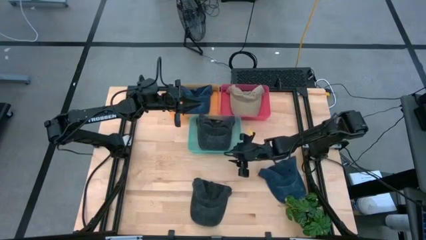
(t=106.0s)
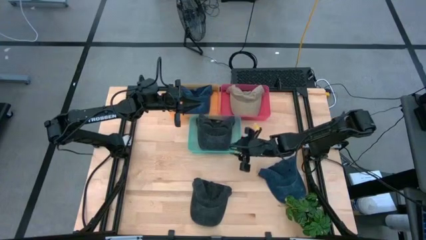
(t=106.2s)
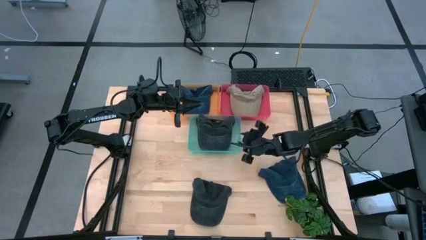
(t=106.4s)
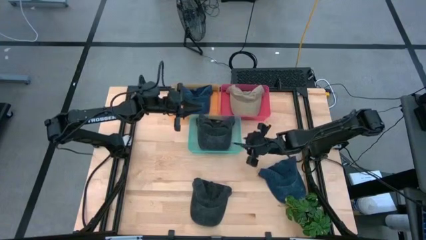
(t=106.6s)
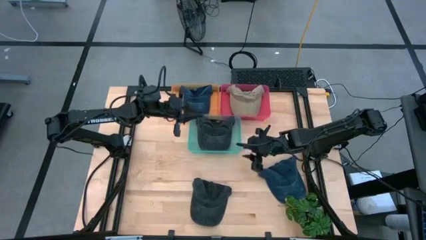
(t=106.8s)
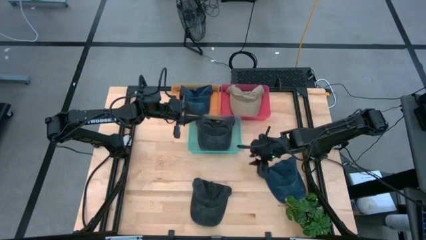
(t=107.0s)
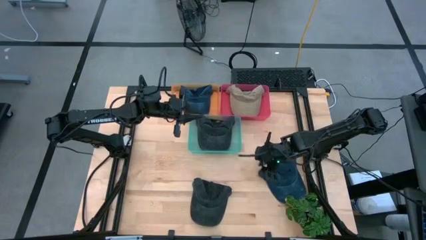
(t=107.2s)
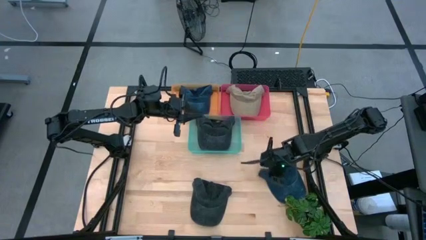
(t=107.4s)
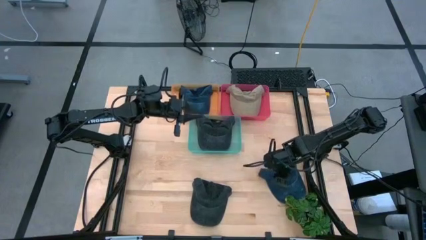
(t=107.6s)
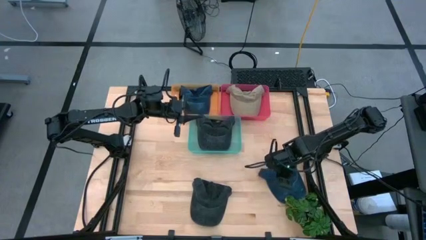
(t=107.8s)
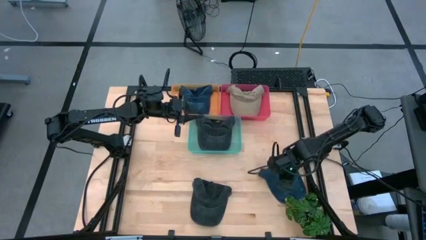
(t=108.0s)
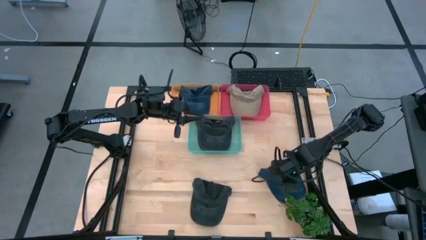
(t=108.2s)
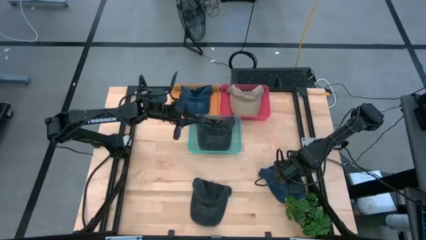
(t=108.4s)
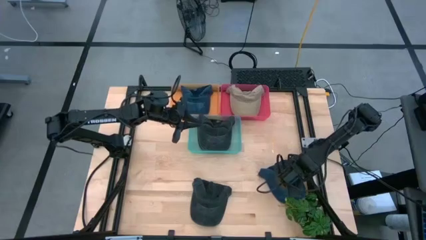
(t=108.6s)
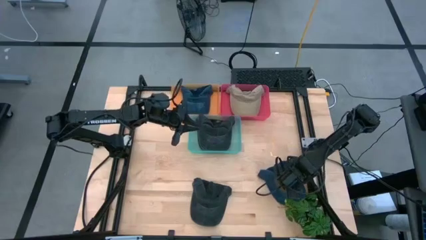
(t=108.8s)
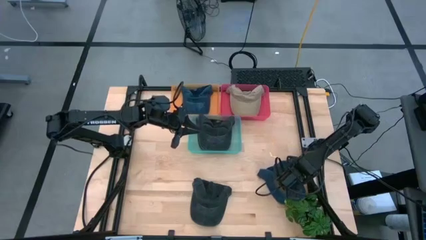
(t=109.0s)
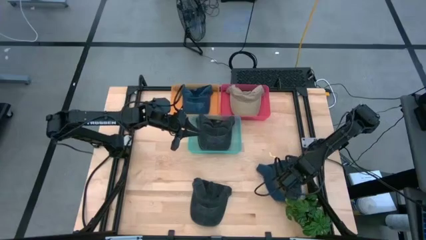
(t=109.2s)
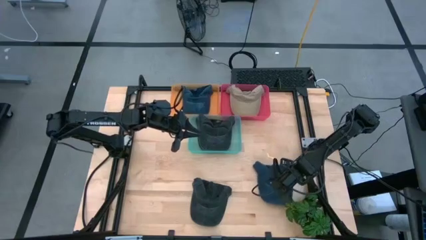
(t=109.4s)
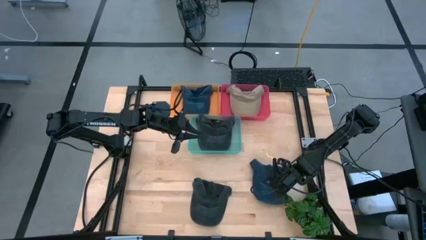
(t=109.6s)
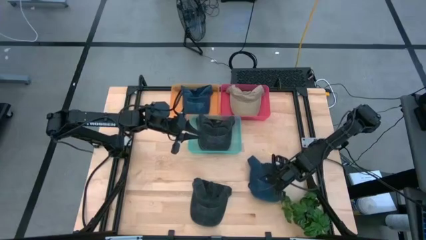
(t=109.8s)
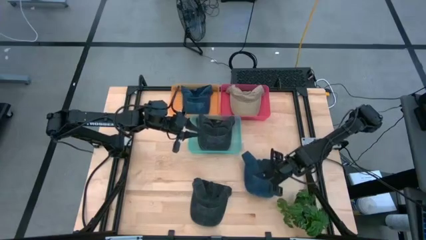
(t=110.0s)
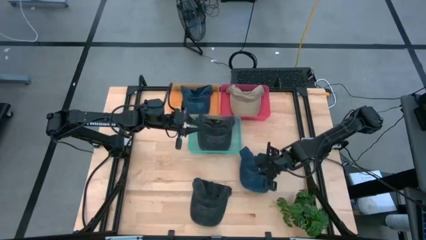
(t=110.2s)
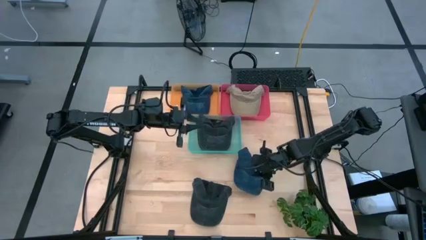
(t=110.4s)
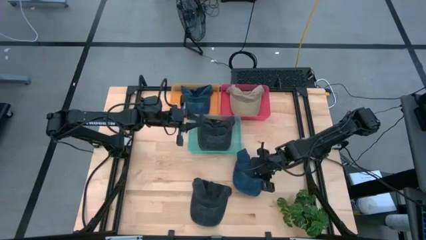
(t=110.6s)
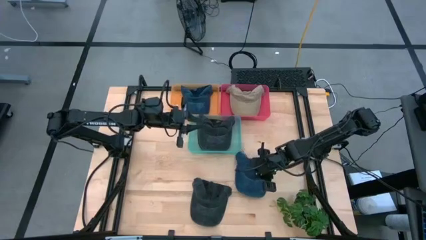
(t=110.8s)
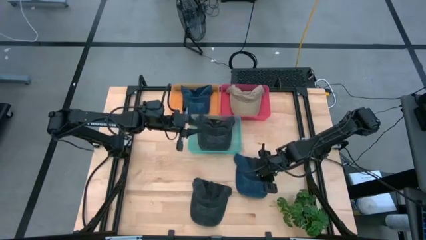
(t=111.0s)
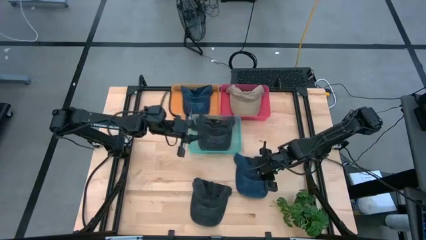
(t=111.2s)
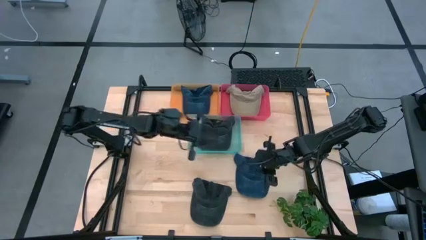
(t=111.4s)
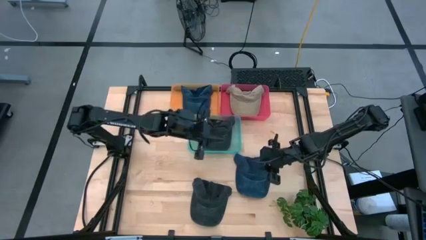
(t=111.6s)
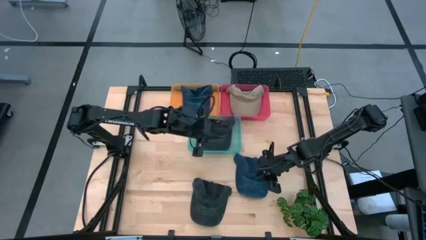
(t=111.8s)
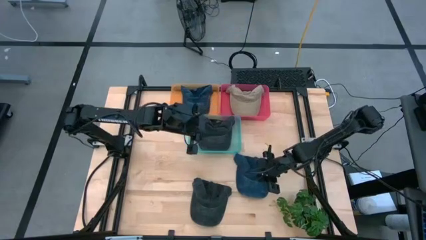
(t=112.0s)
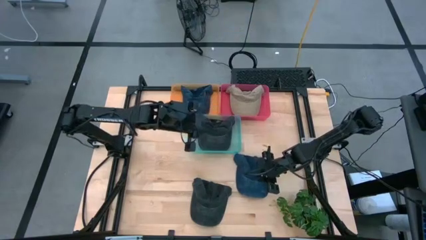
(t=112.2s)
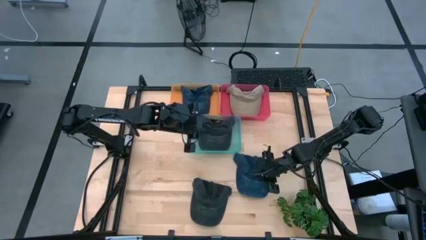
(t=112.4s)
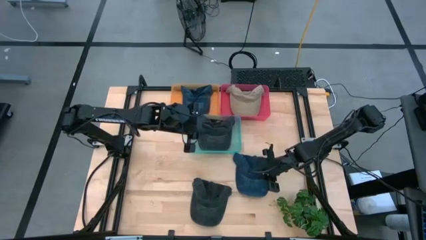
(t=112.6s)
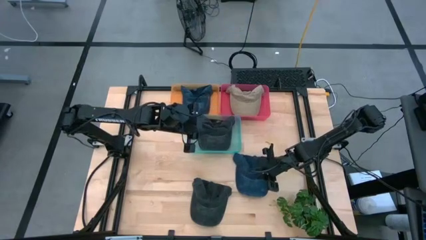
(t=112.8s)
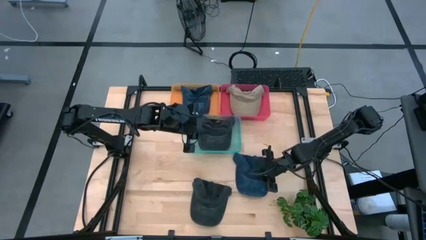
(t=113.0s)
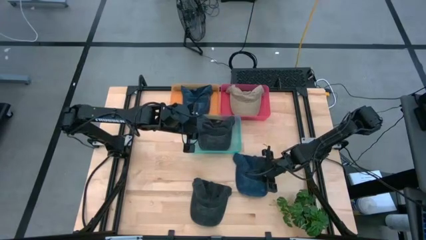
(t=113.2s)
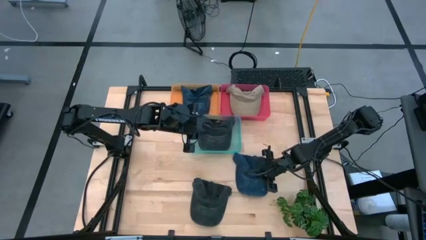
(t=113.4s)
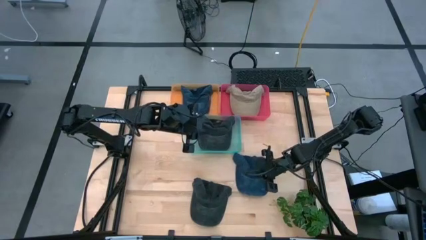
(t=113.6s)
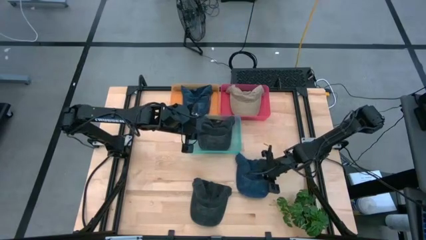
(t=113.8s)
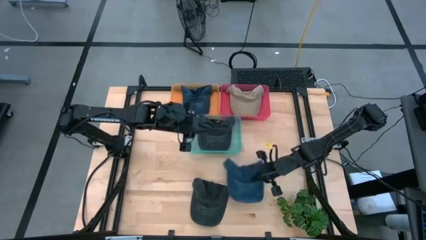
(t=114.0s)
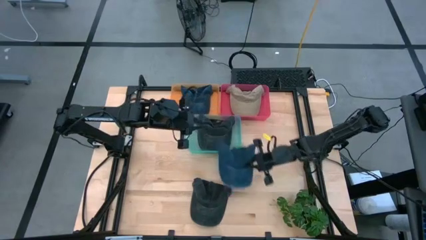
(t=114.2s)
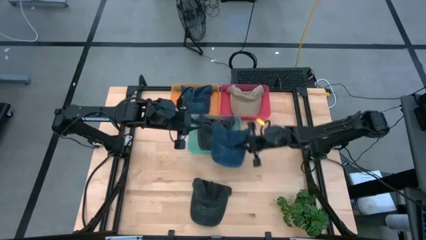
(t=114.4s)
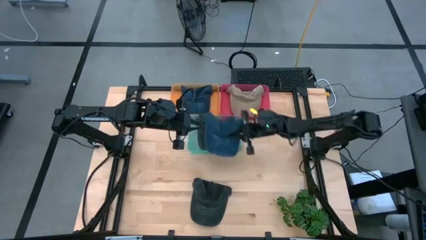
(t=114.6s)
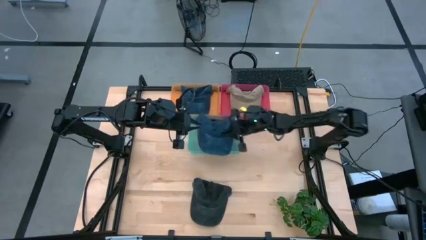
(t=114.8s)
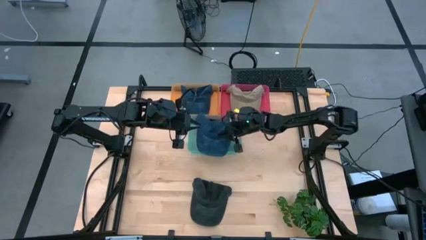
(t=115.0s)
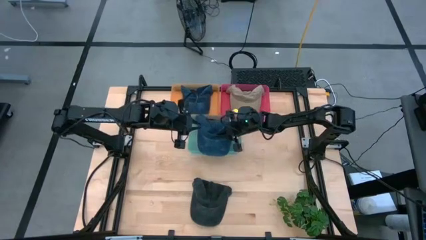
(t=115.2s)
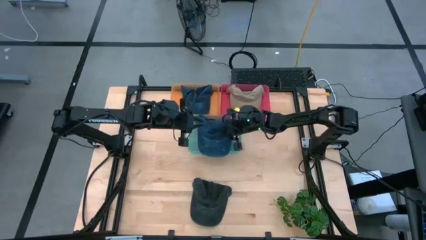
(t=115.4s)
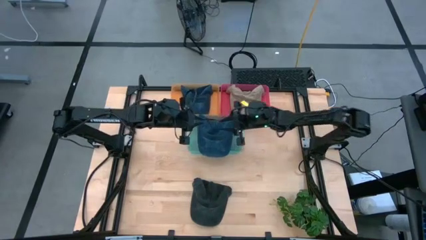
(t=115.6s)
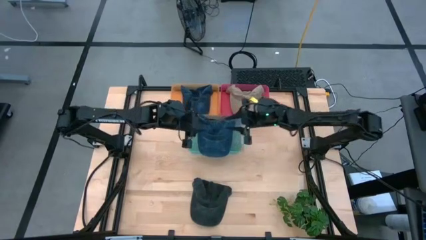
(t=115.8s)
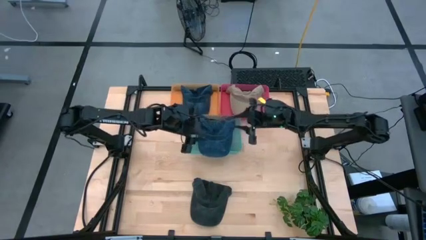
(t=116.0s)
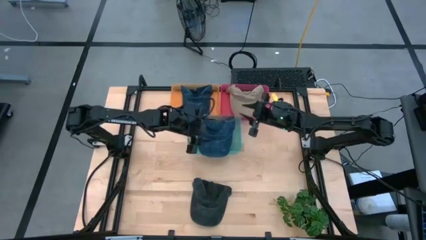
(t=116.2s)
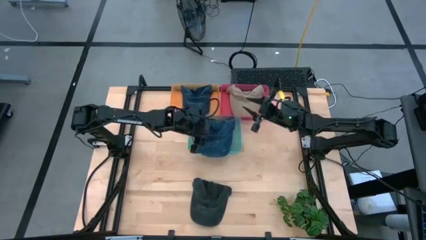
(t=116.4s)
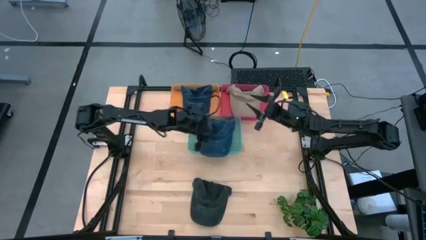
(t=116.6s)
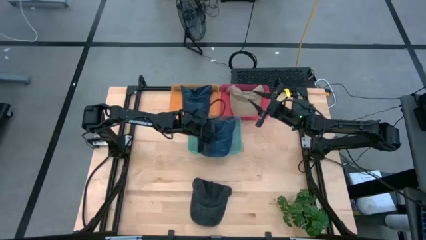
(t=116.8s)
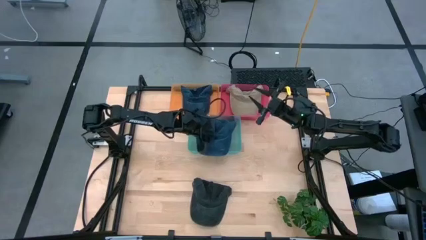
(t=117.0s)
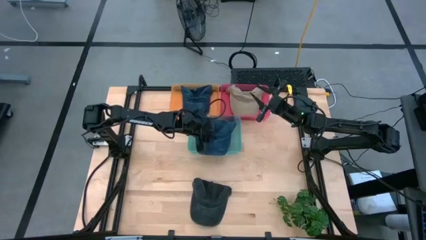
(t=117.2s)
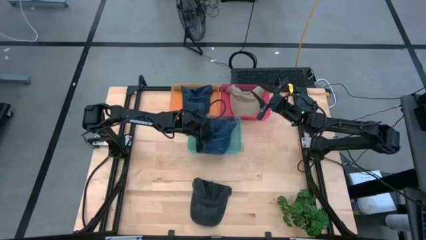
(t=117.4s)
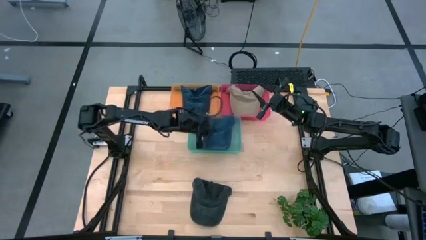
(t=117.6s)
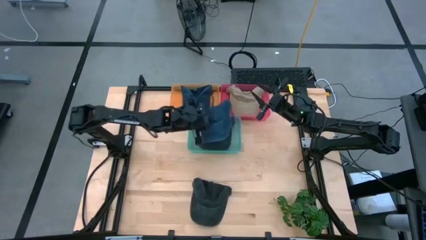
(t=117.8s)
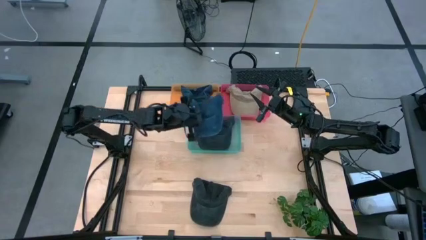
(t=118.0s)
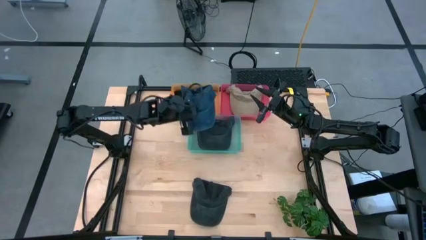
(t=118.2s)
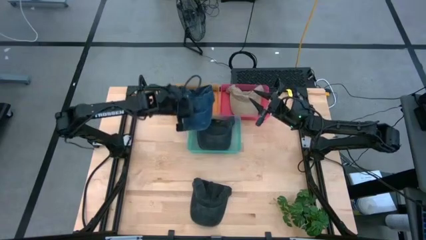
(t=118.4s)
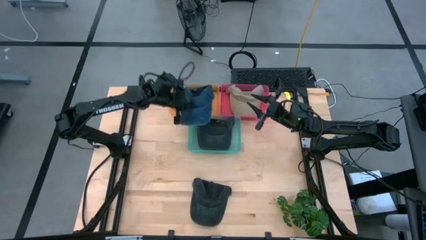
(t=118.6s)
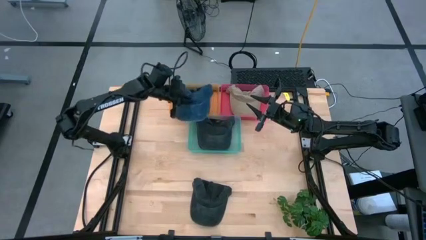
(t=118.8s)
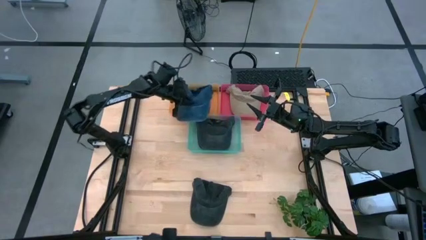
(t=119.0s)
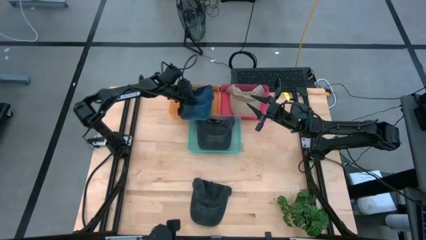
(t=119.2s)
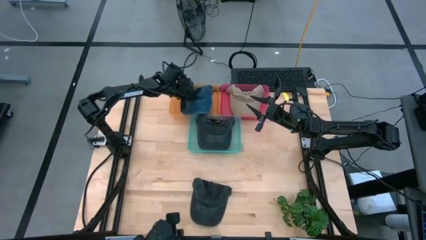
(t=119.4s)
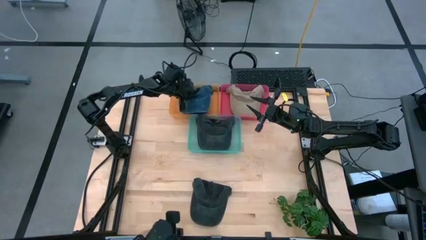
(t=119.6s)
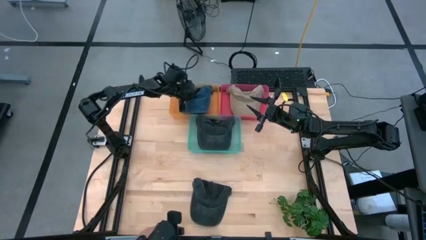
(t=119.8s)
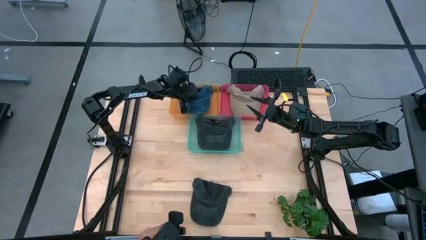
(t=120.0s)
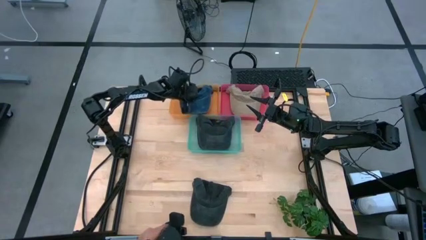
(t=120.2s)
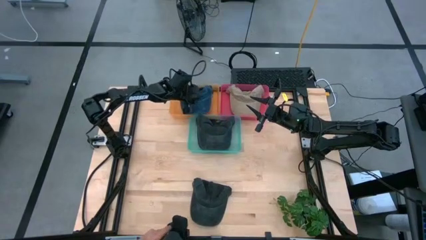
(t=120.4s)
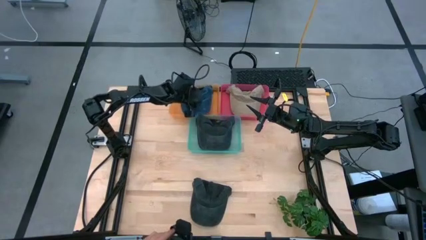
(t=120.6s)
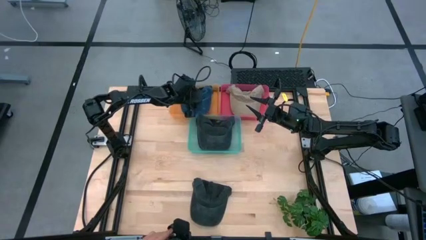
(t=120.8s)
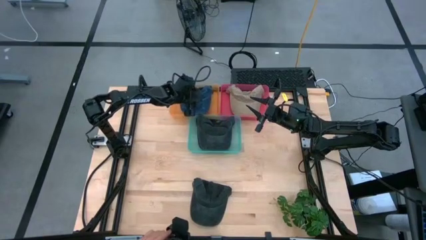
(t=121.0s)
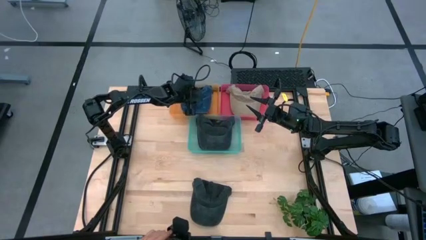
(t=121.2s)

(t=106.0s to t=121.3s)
Task: Pick & Place hat
Put the blue cap into the orange bin

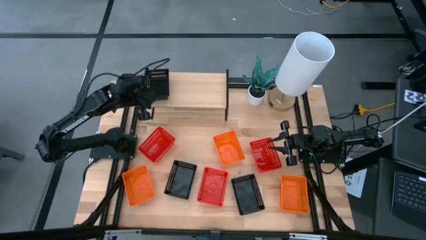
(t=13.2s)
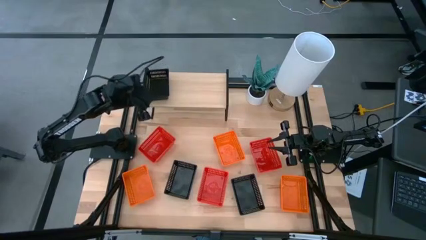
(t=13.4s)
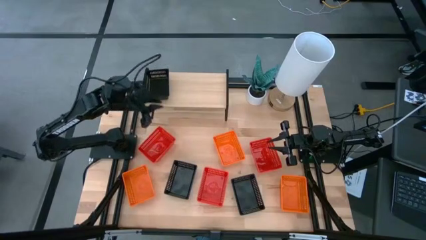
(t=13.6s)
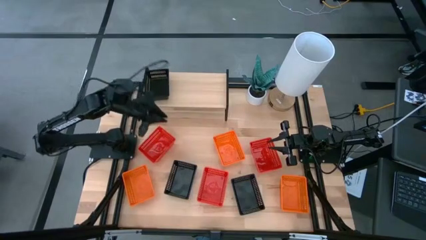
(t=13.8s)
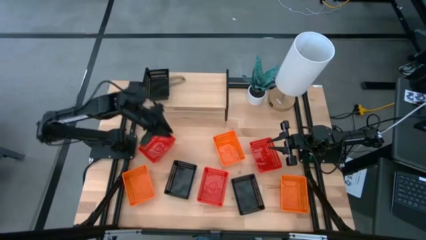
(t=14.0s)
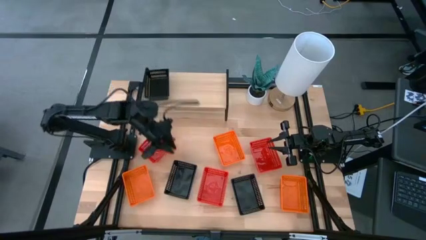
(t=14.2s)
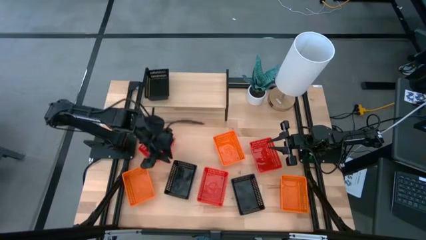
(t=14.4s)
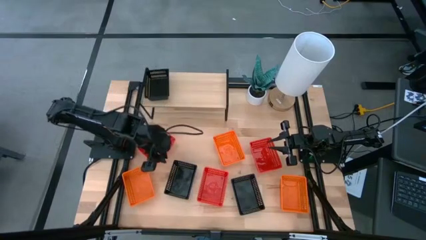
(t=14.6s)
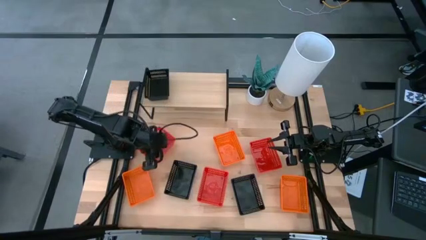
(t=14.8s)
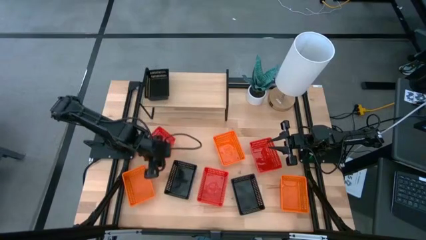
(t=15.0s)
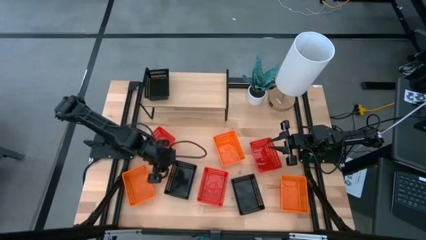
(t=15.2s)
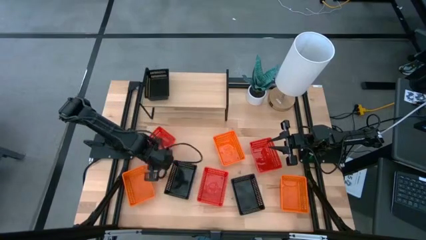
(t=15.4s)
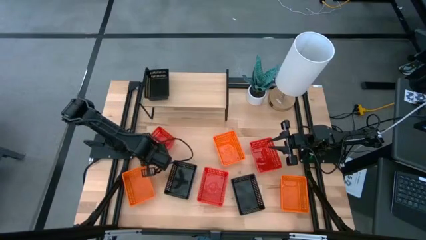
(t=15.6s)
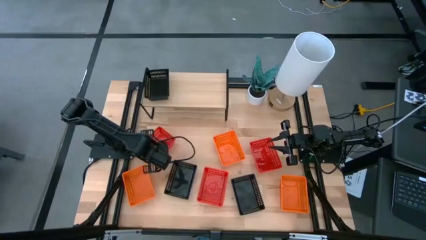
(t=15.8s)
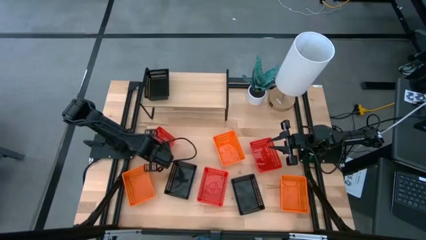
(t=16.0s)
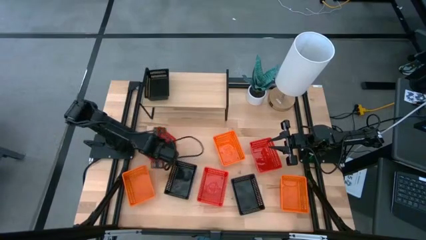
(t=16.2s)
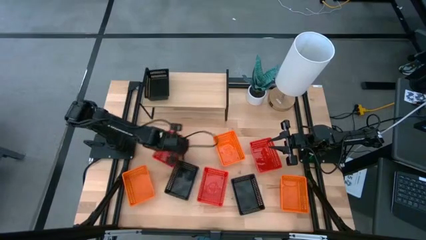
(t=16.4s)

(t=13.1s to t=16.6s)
Task: Stack baskets on shelf by color
Adjust the top left red bin
